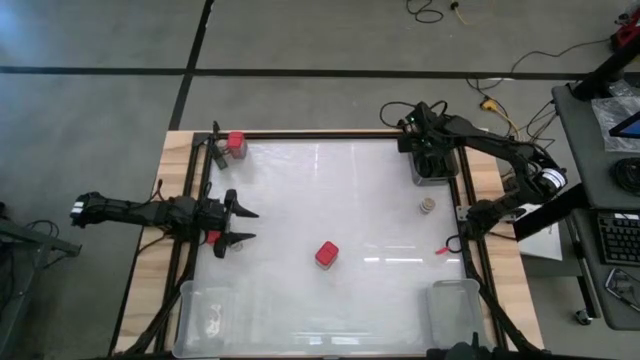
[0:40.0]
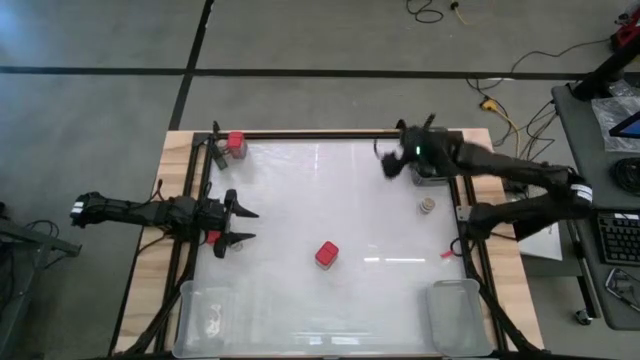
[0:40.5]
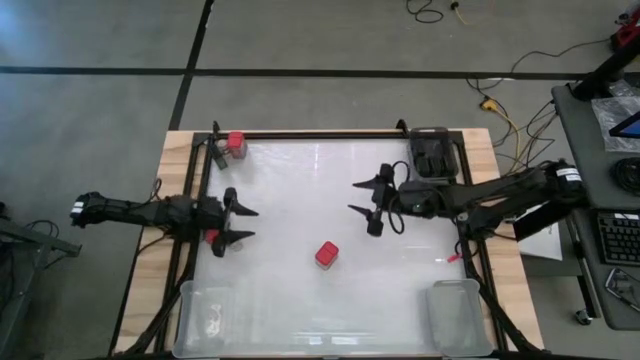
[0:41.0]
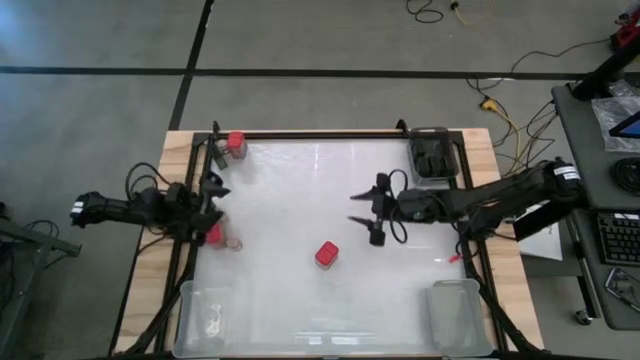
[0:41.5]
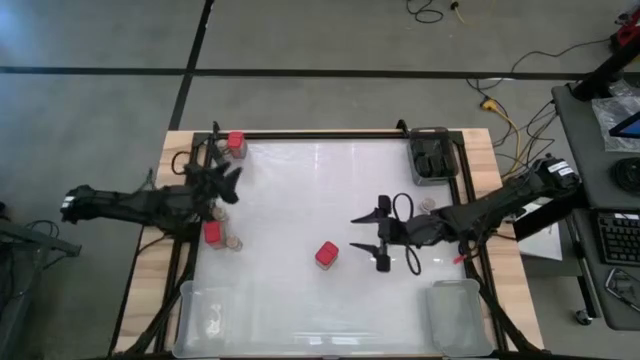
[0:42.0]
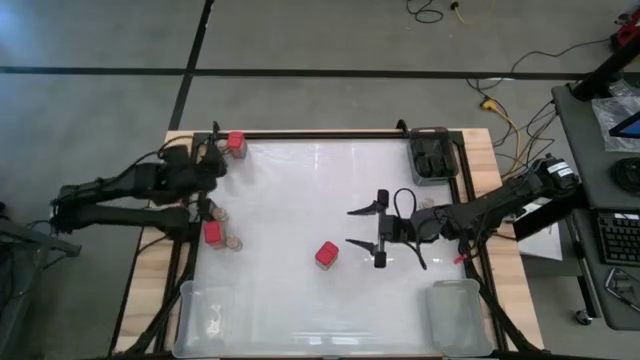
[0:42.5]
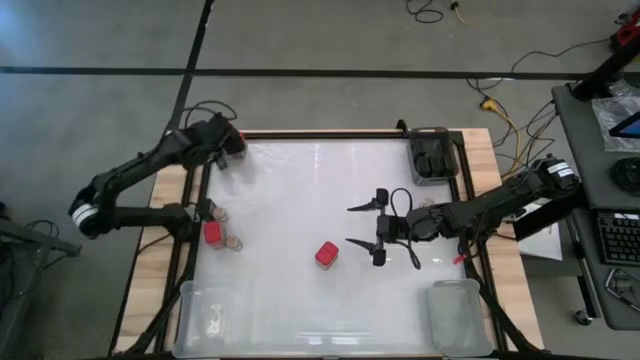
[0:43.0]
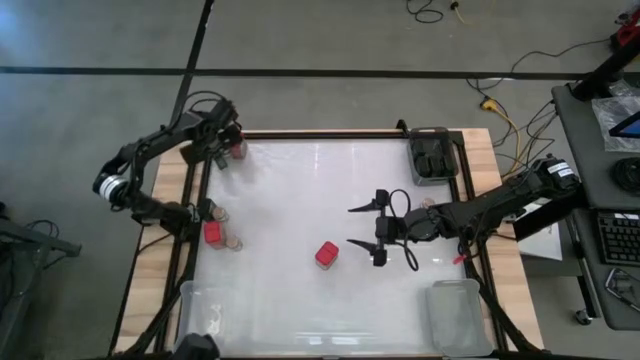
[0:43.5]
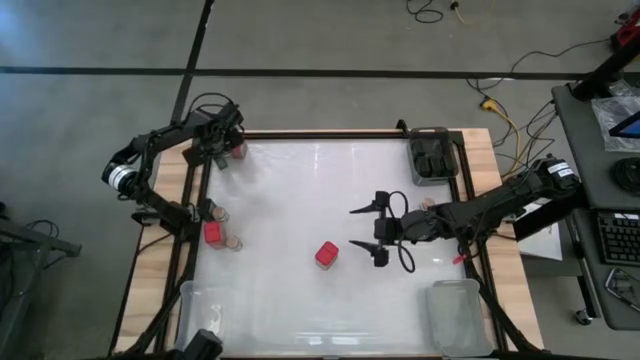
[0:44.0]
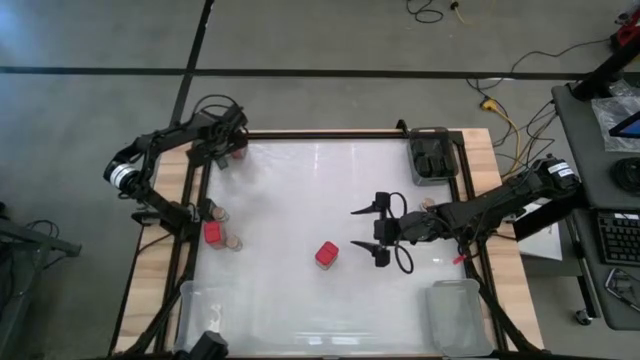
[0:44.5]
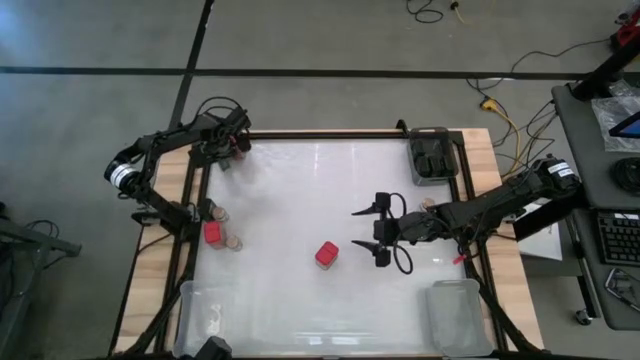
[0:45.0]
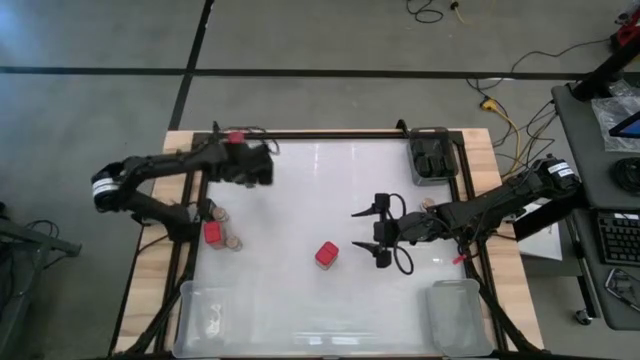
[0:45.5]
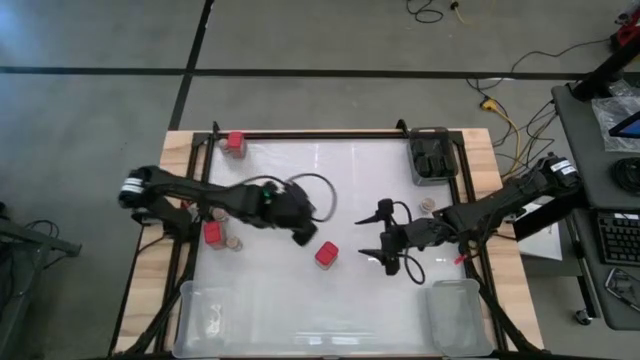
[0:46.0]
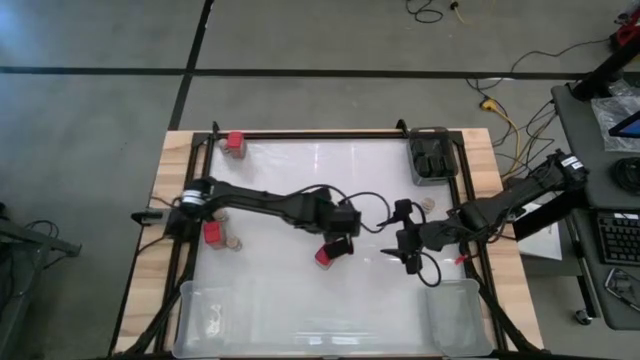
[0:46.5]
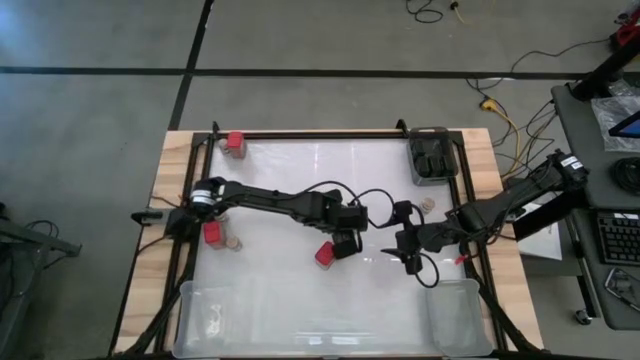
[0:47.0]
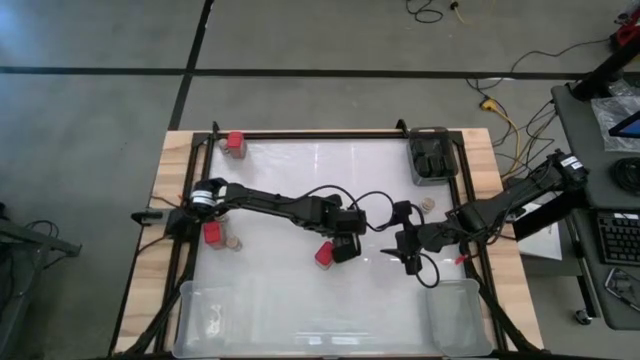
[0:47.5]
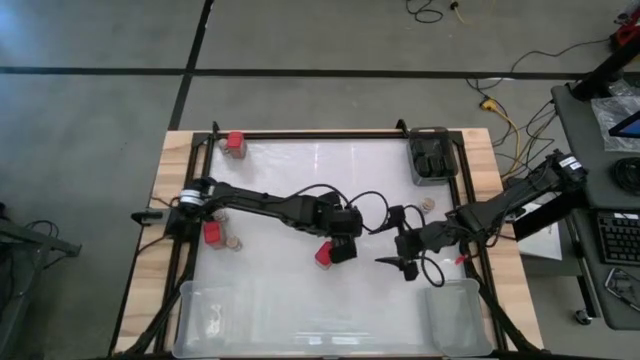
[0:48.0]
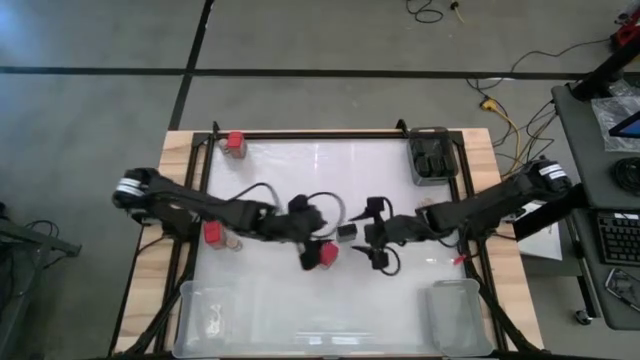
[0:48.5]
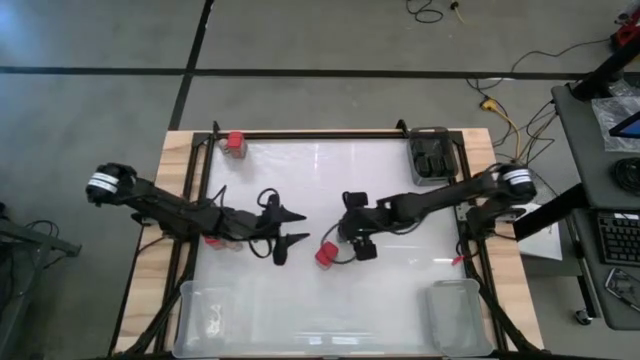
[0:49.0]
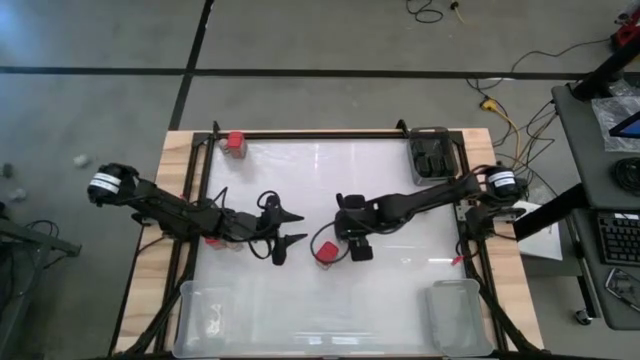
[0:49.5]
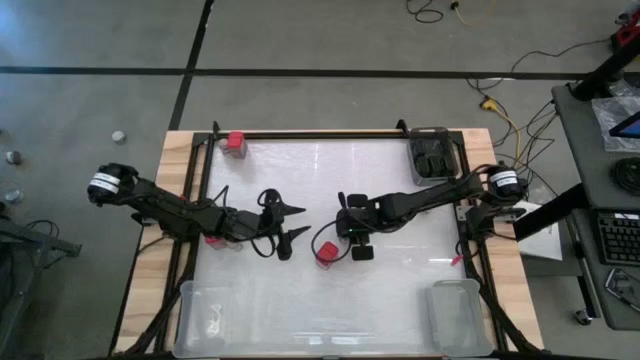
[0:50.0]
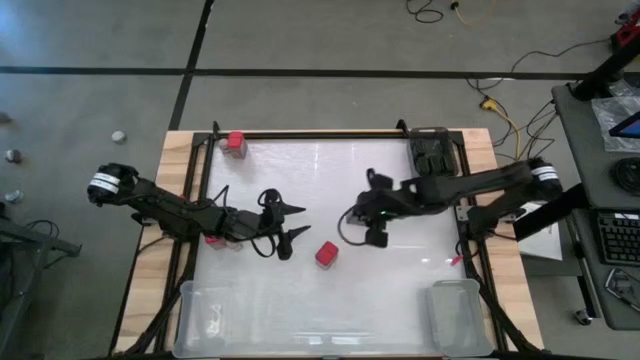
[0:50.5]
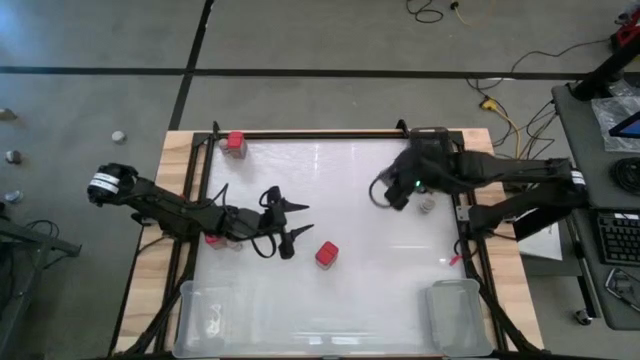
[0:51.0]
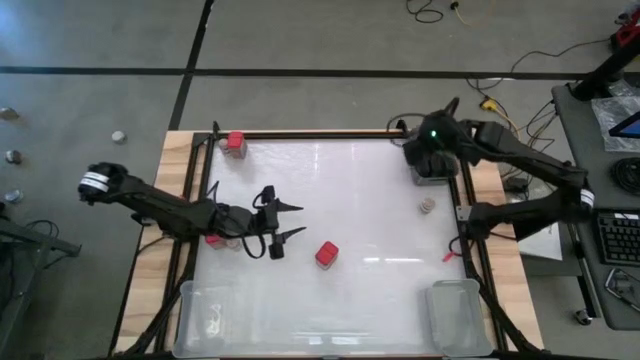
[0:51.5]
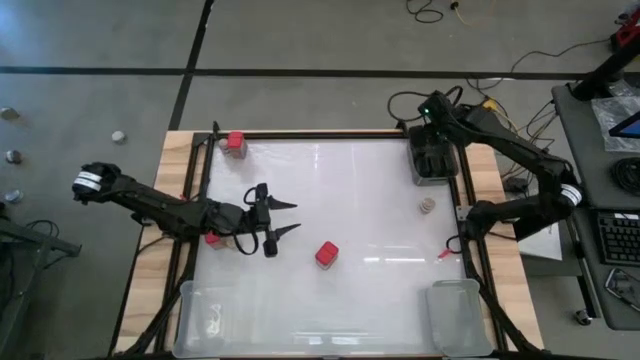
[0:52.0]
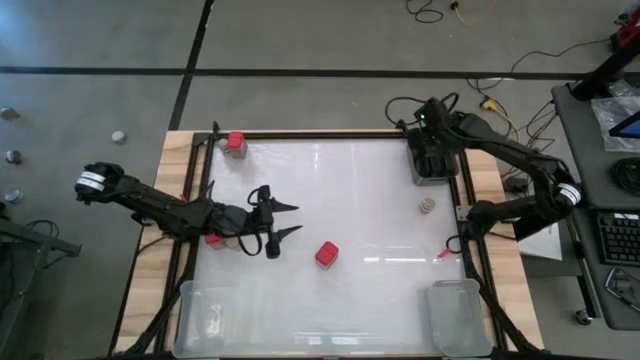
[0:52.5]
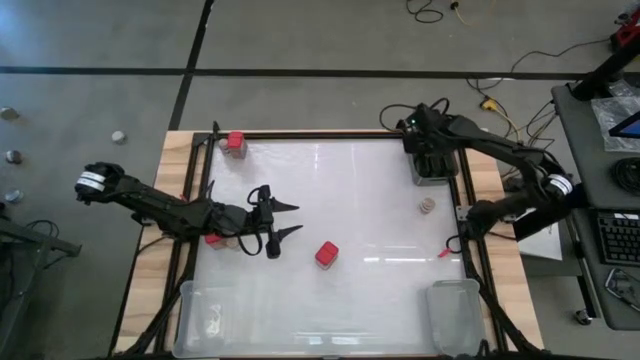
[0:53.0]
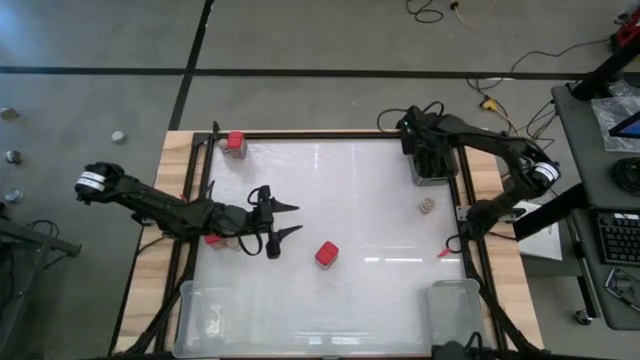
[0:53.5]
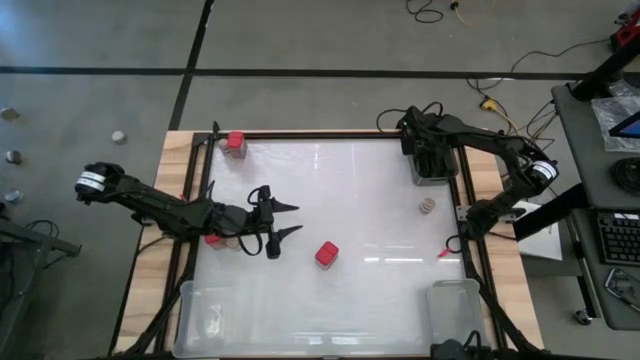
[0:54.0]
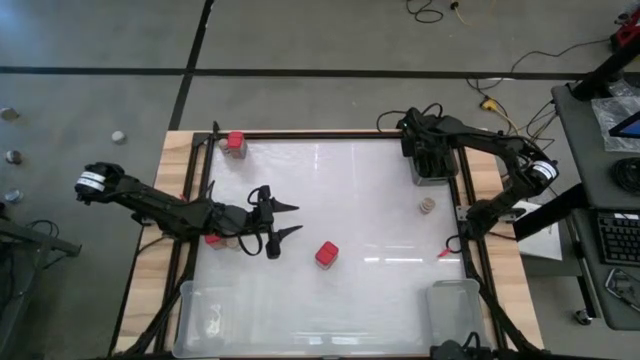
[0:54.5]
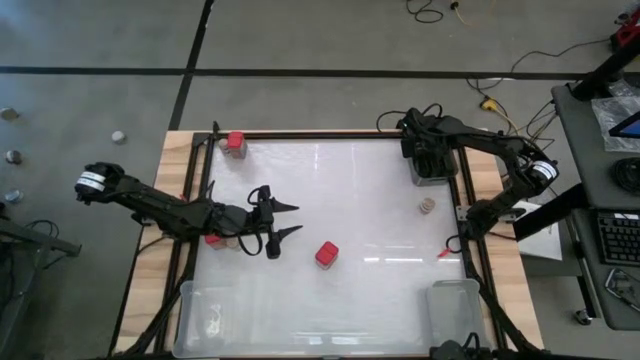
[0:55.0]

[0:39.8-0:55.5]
Task: Sort spices by type
Put the green seasoning can into the black bin

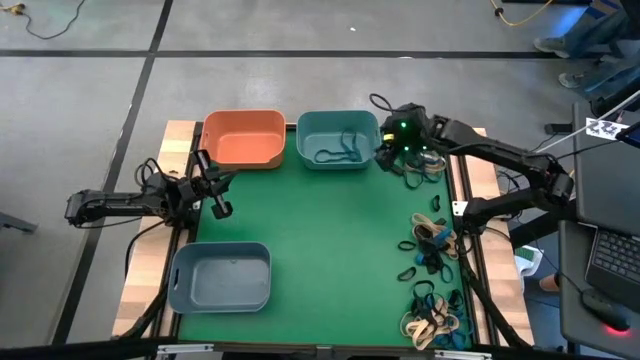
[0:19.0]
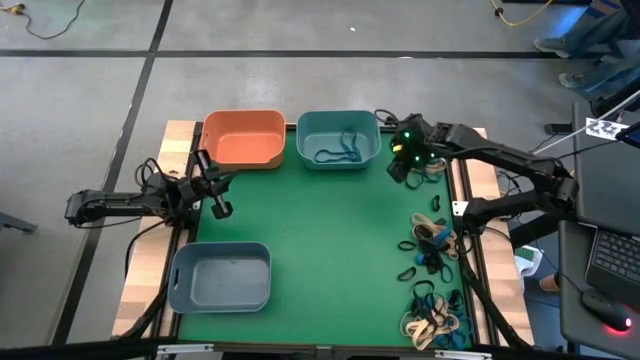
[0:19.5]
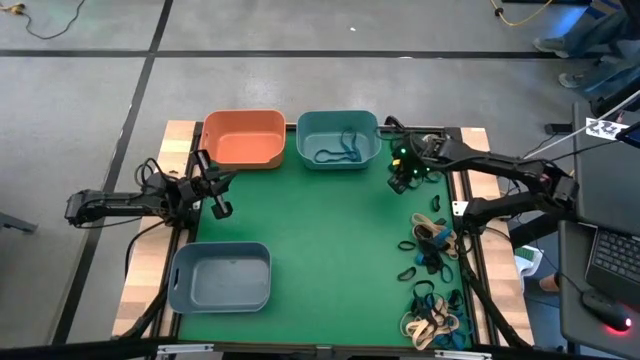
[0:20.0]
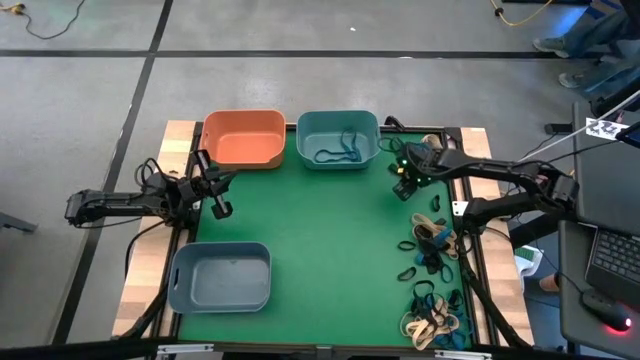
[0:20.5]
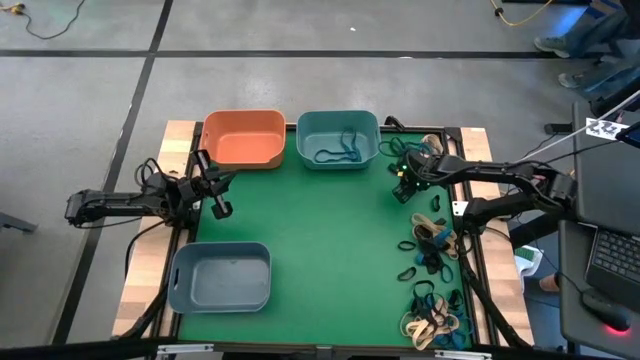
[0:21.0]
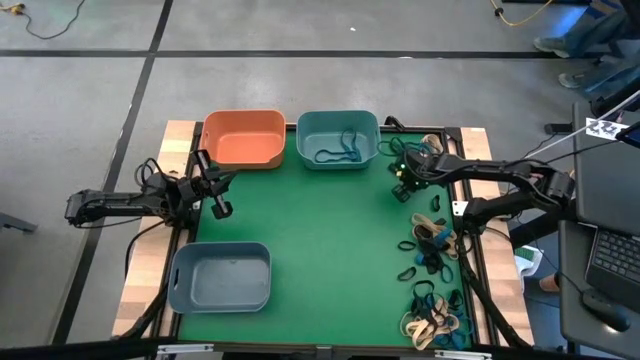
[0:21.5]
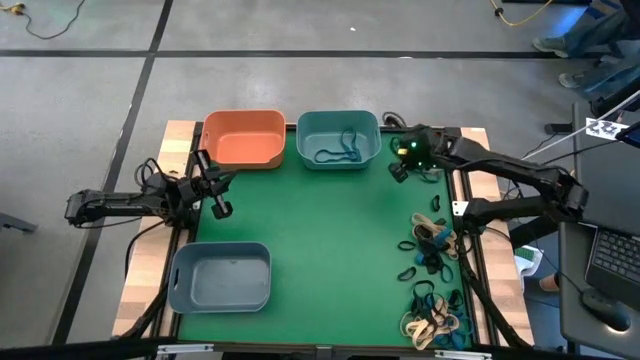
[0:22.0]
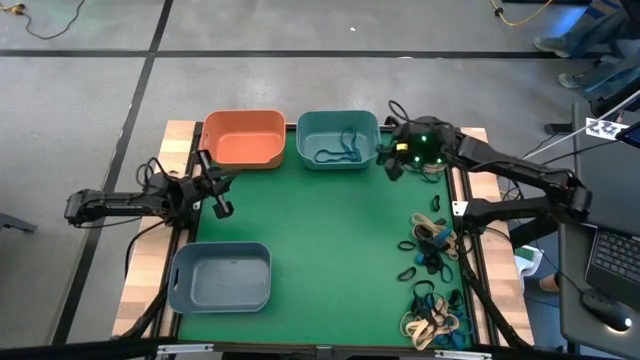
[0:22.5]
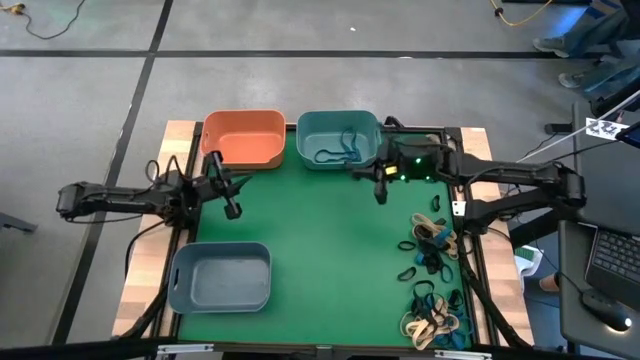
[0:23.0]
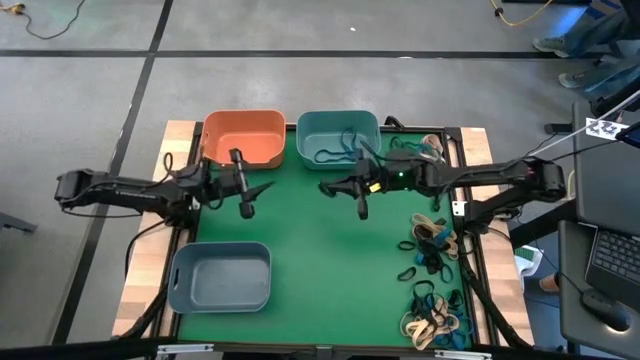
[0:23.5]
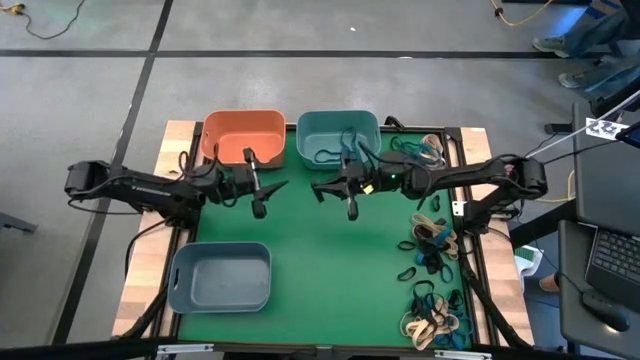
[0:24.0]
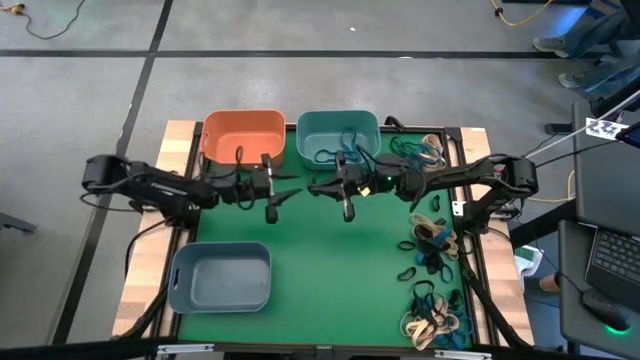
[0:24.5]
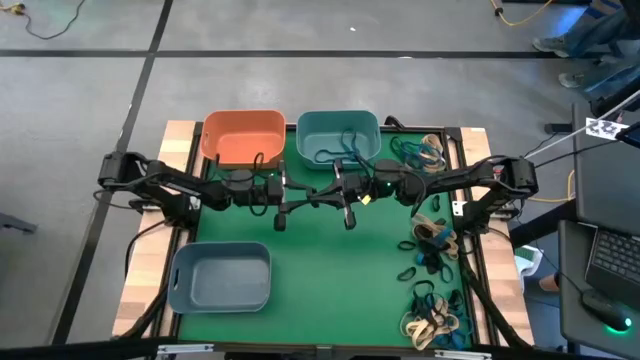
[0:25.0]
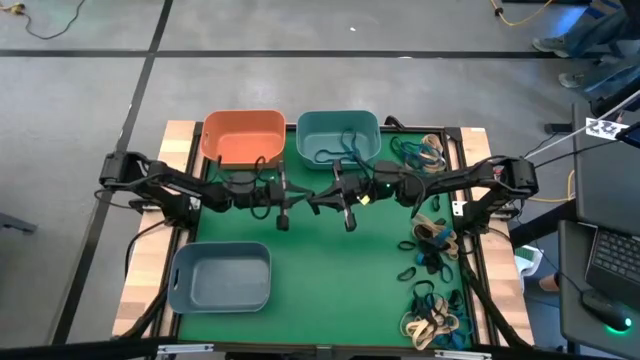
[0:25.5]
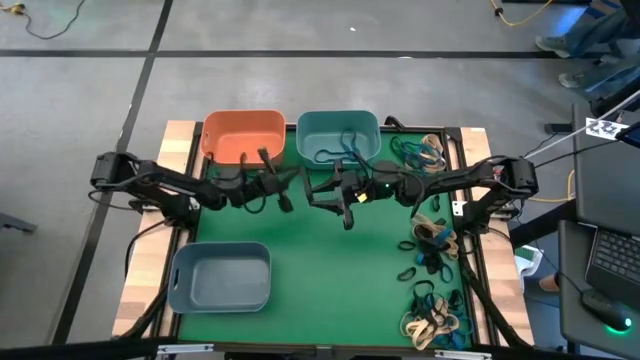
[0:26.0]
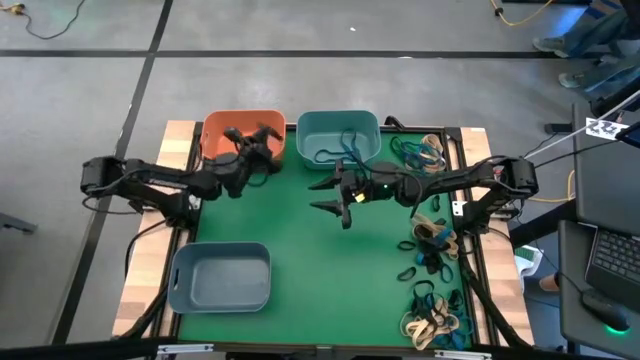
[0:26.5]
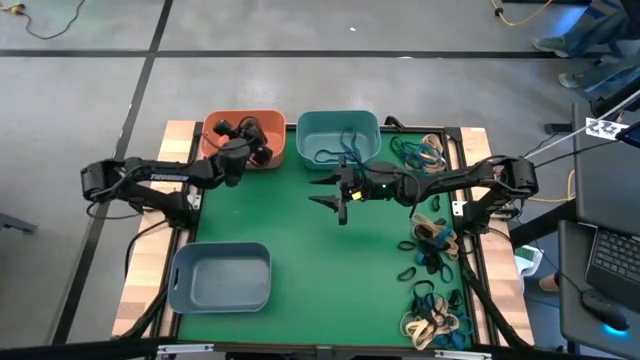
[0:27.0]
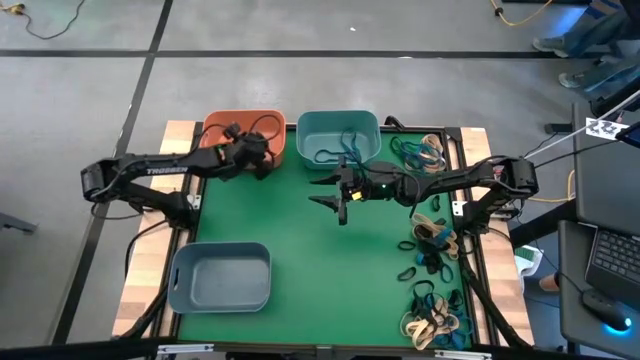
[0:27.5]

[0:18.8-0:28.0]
Task: Sort rubber bands into baskets
Put the black rubber band into the orange bin
